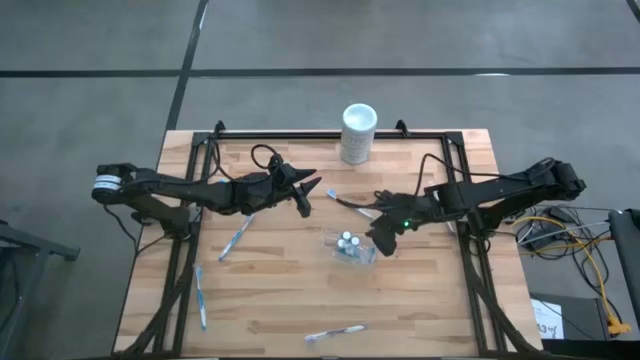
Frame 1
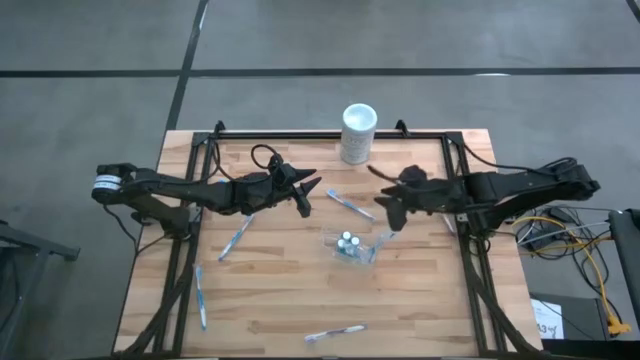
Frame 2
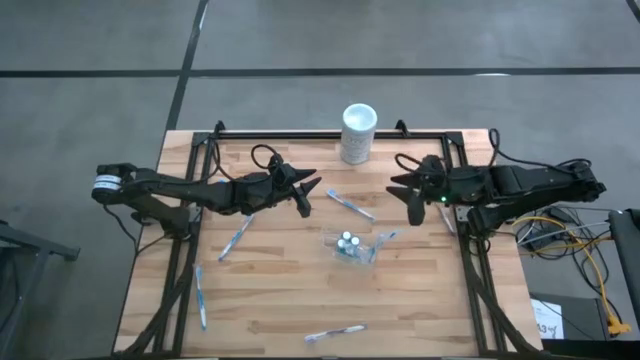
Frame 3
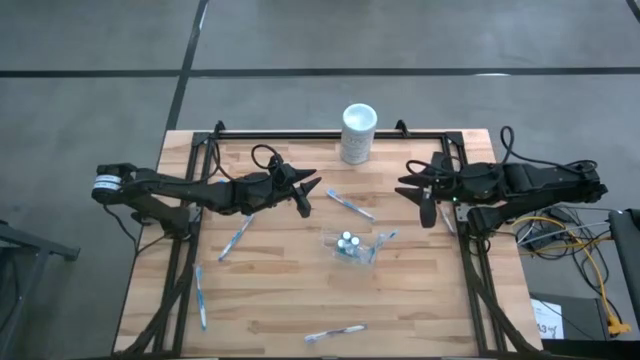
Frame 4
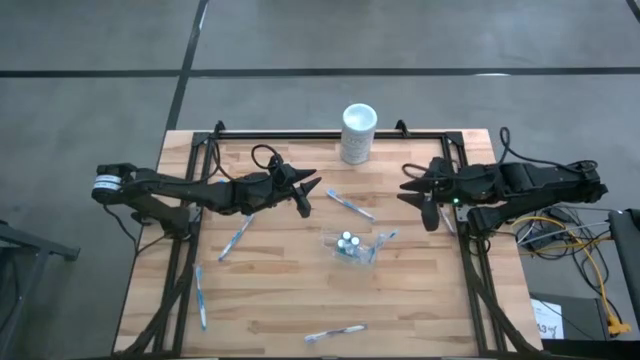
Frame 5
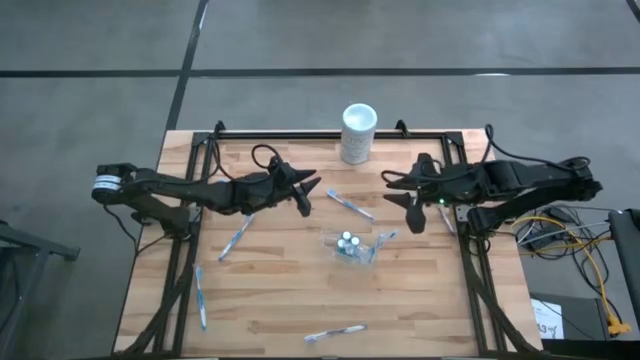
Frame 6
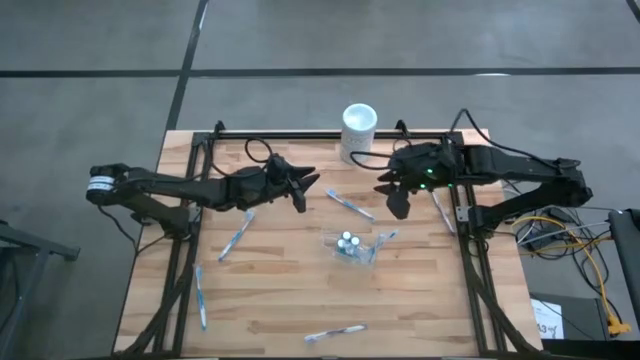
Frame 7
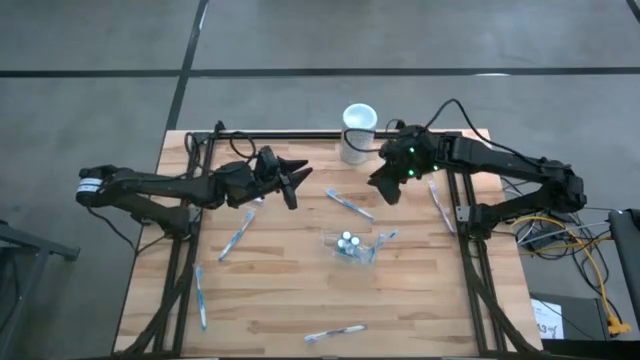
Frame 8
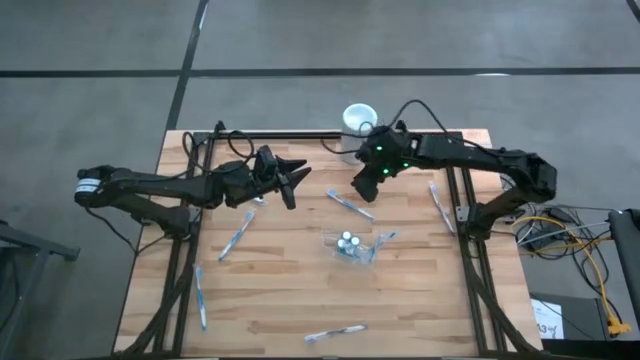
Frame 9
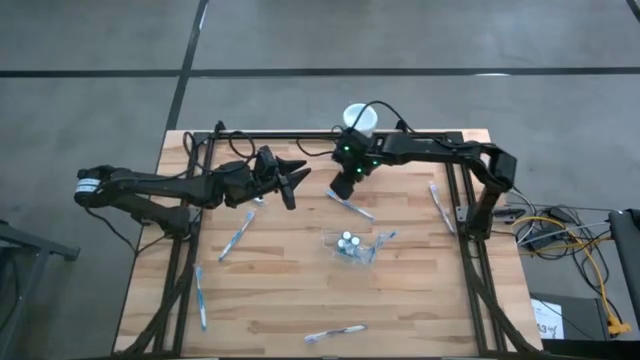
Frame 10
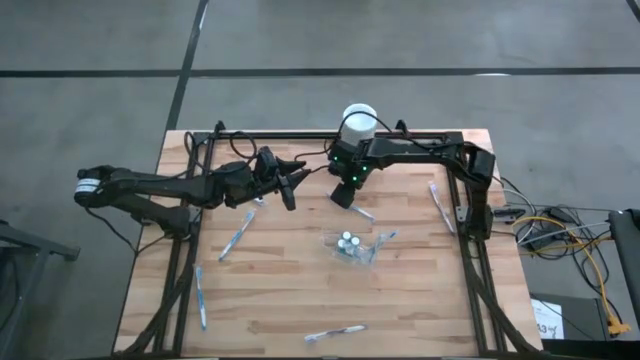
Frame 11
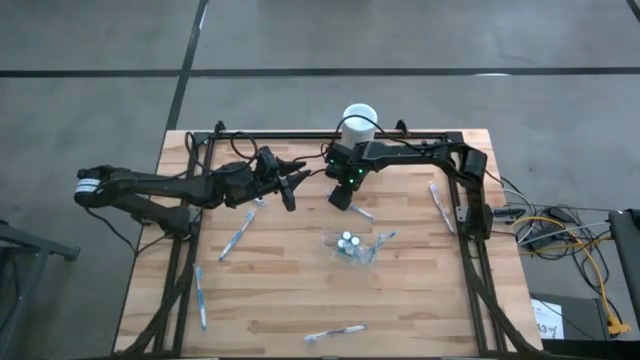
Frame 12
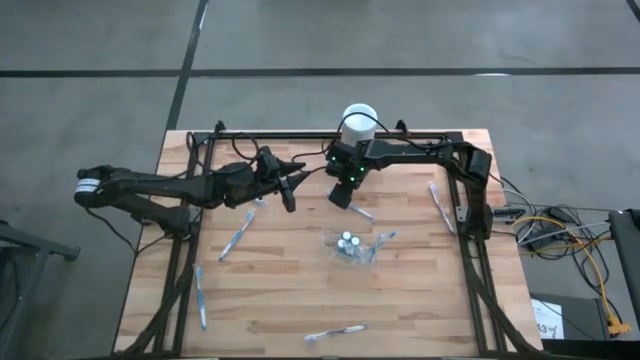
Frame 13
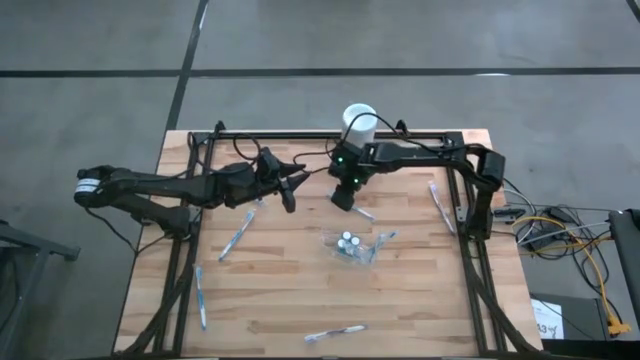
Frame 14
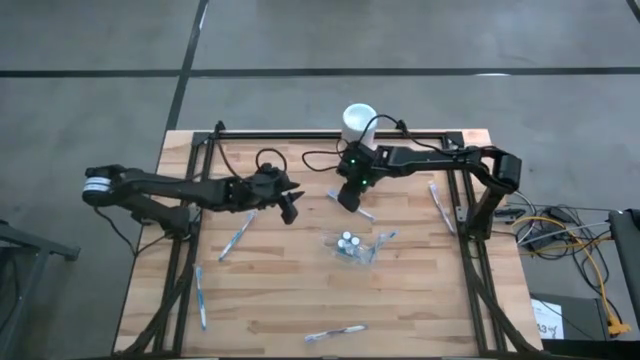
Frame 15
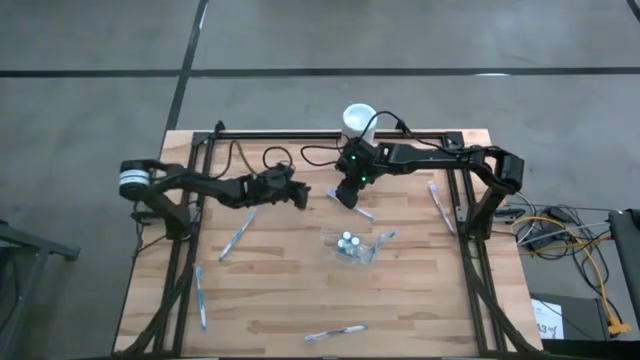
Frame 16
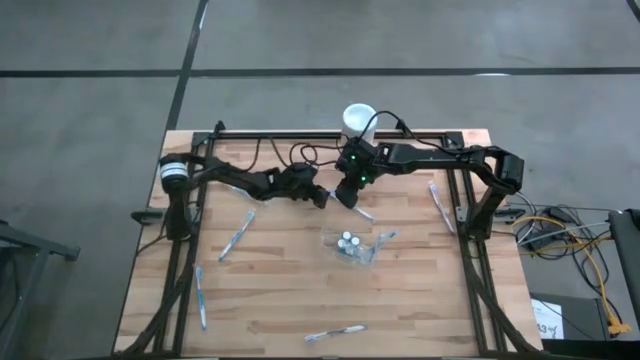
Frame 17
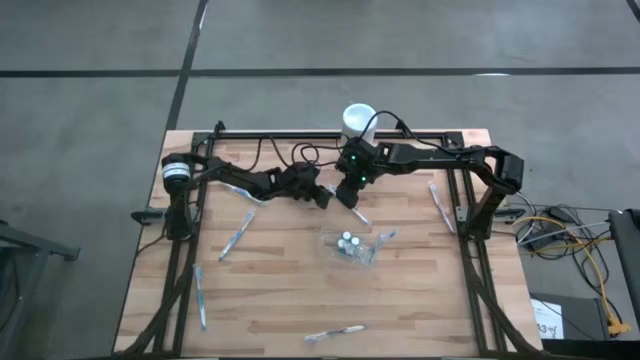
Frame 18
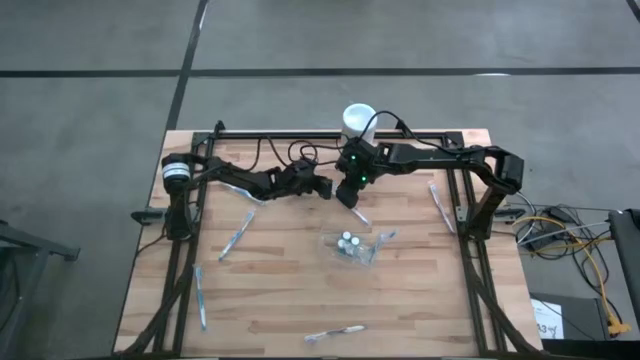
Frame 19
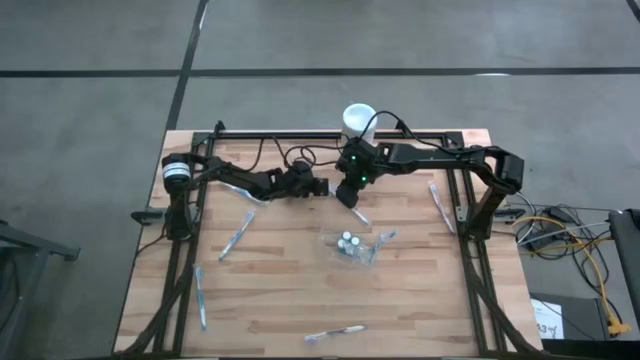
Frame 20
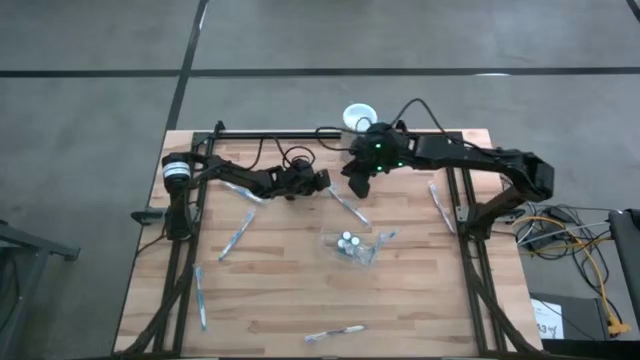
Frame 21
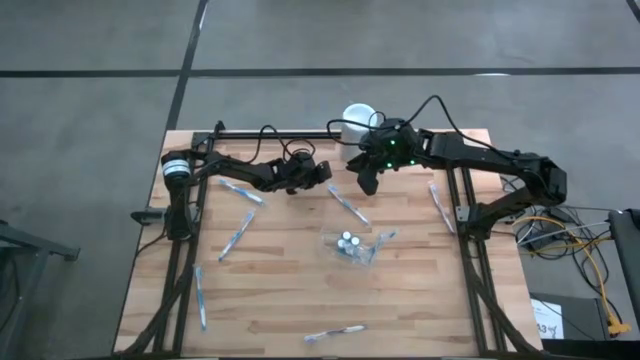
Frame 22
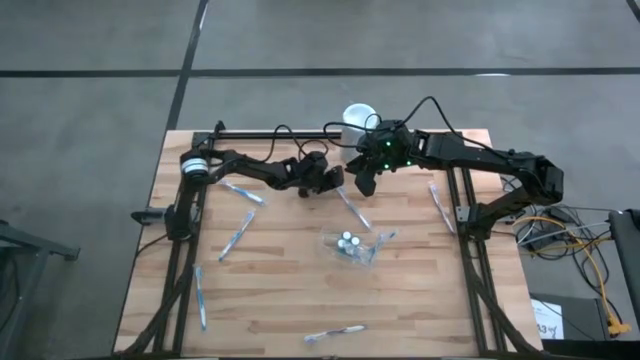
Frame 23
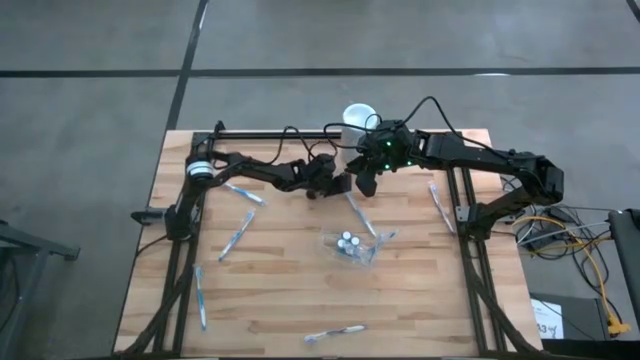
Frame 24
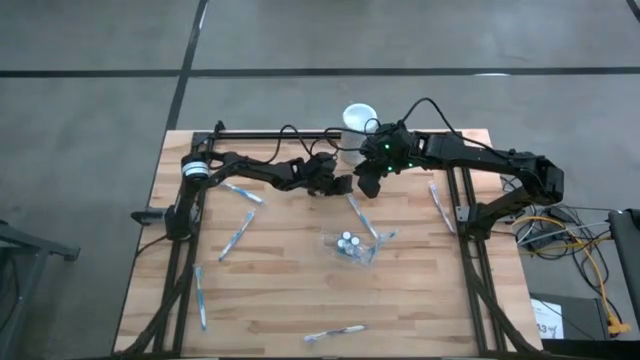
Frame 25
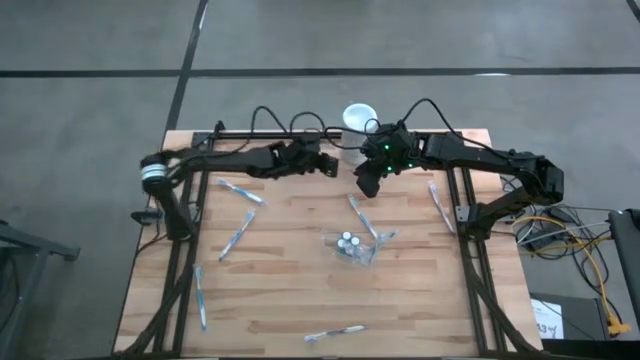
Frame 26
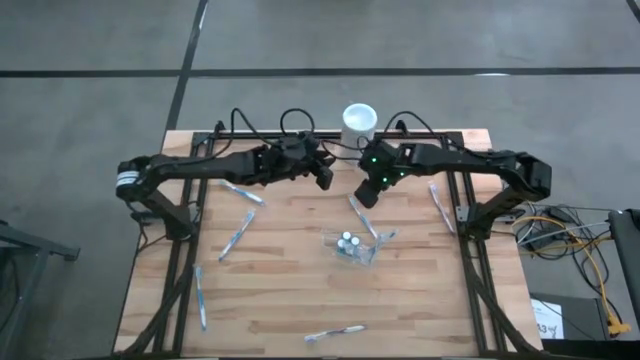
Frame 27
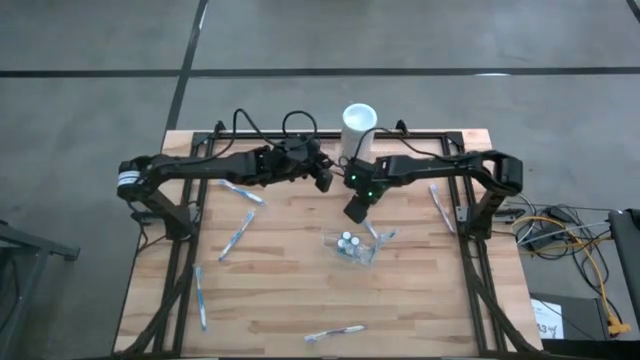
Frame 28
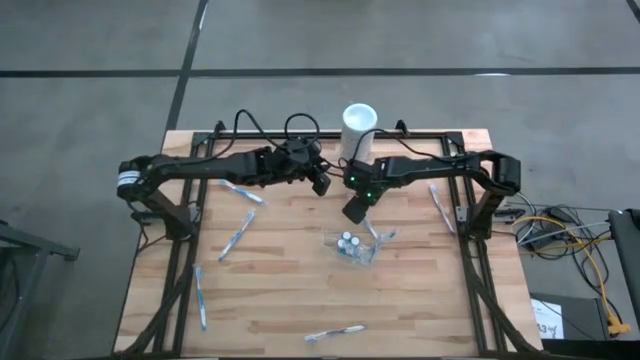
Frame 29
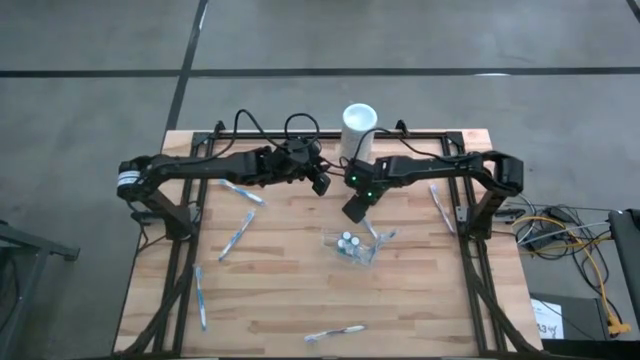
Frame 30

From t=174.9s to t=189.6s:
Task: Pick & Place toothbrushing station
Put the blue toothbrush into the transparent organizer

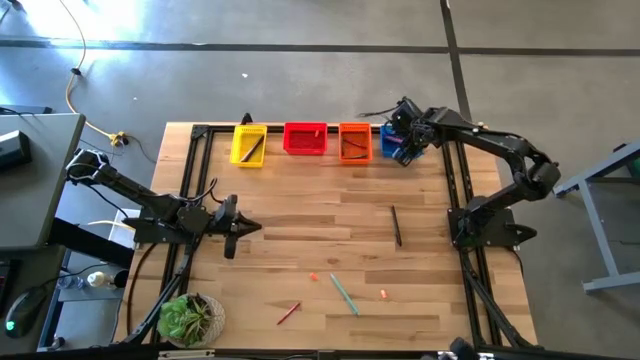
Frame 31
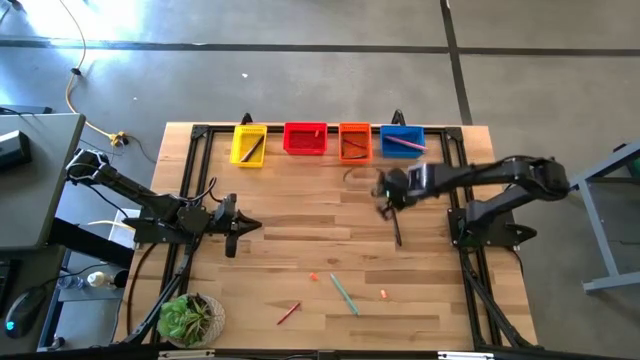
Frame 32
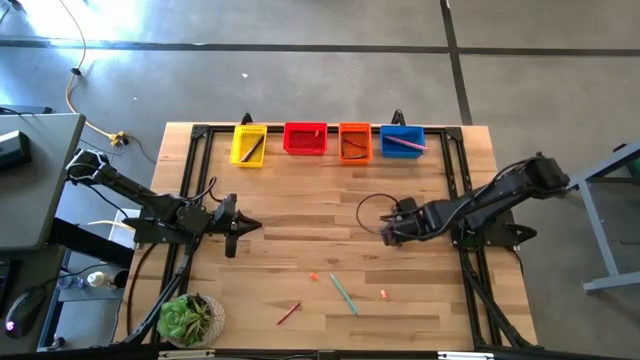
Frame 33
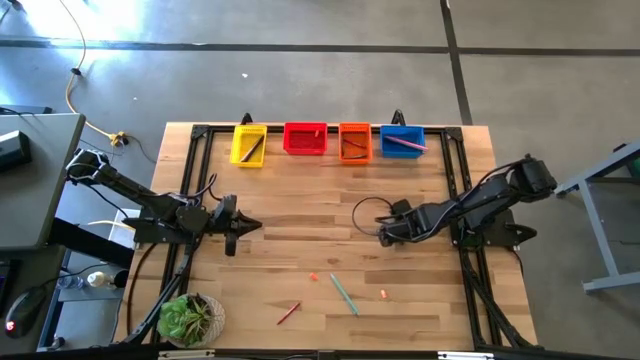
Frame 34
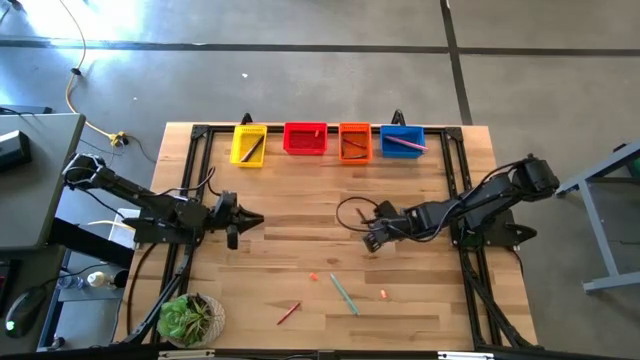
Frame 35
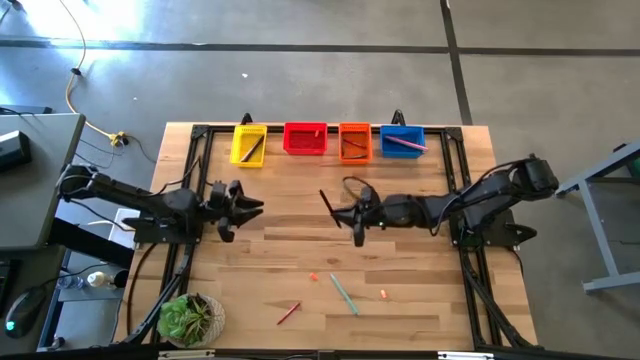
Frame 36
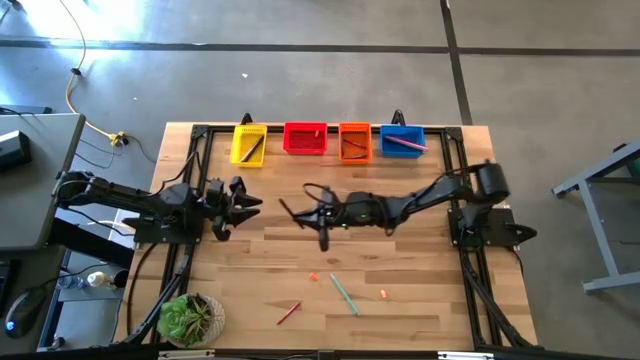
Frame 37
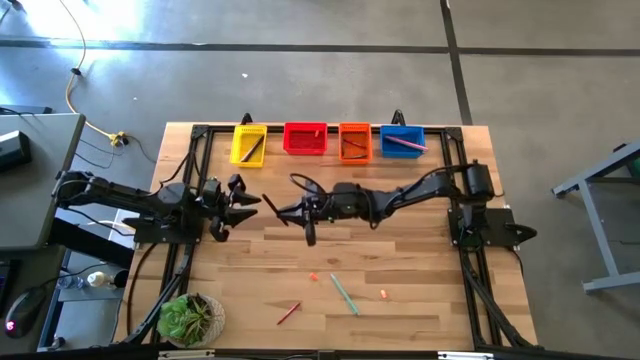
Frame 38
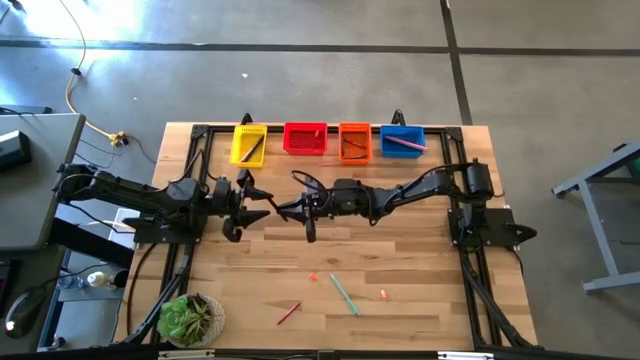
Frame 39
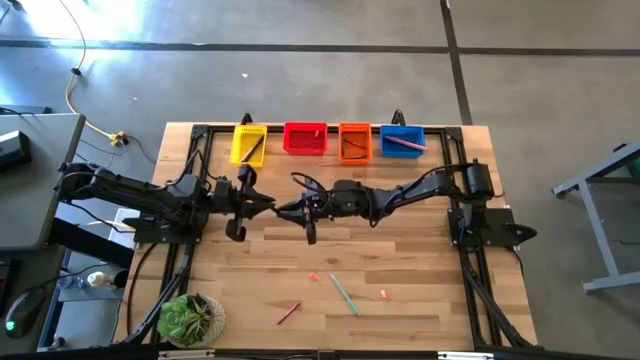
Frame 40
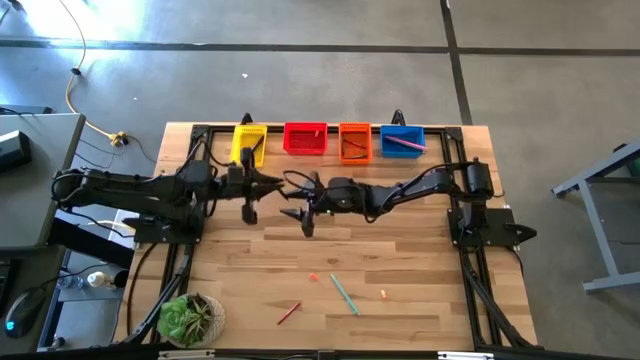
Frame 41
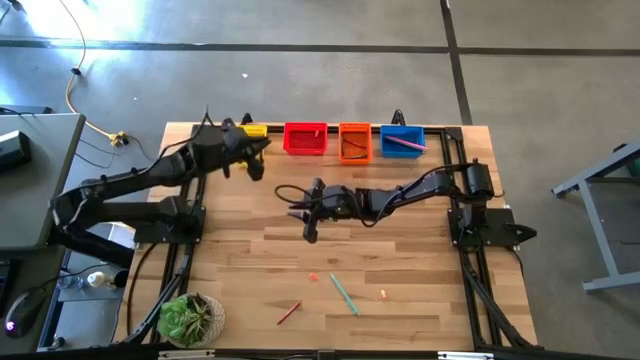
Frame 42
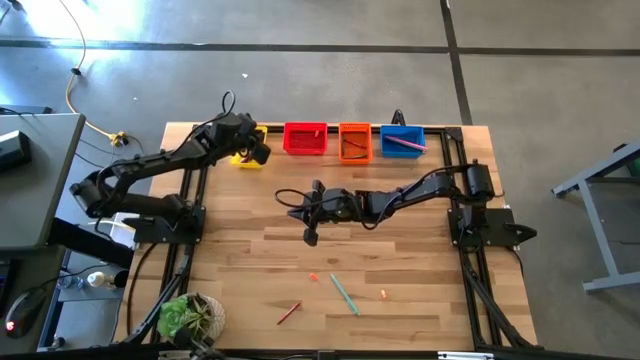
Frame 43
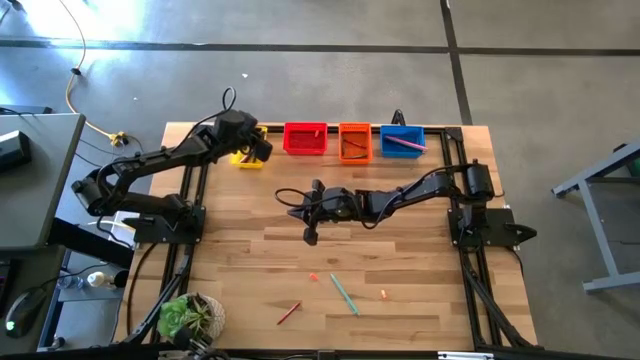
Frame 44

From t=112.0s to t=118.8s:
Task: Sort crayons/erasers/pens/pencils in bins
Put the black pen into the yellow basket
